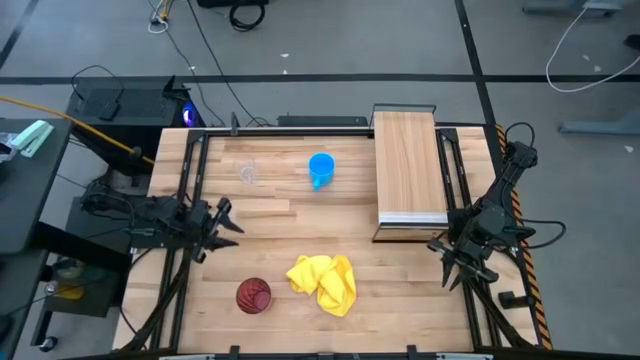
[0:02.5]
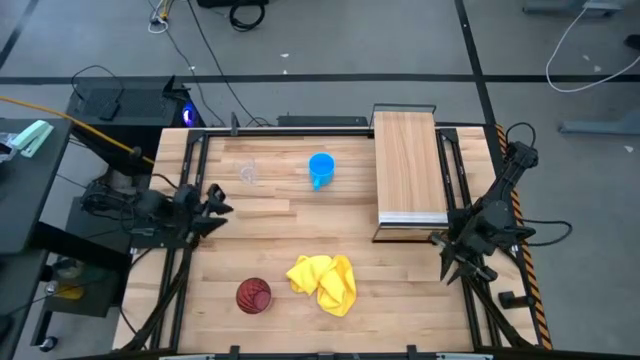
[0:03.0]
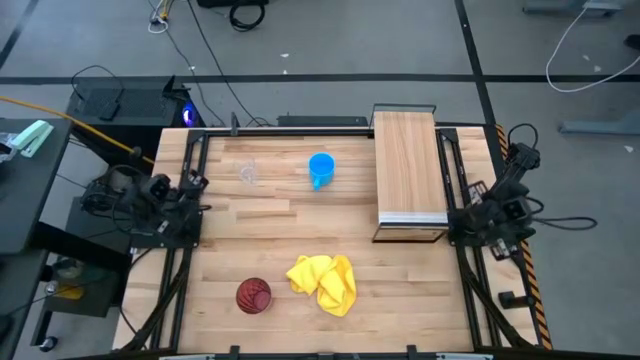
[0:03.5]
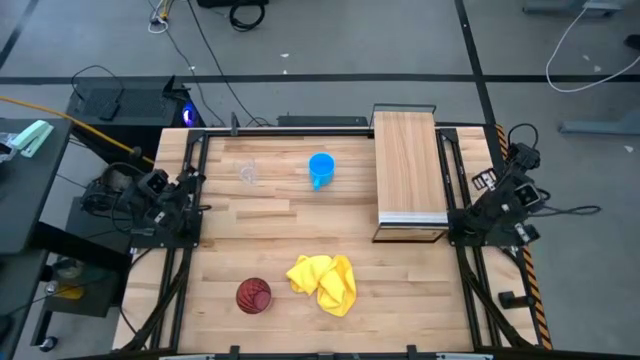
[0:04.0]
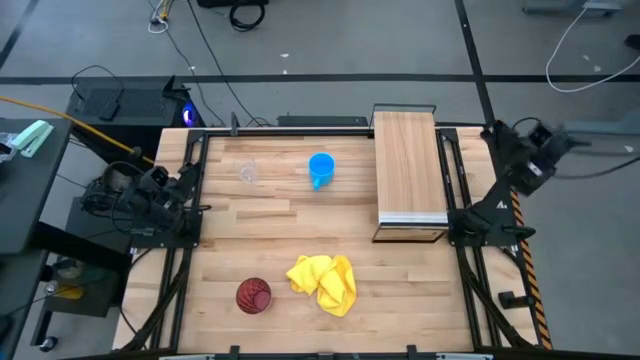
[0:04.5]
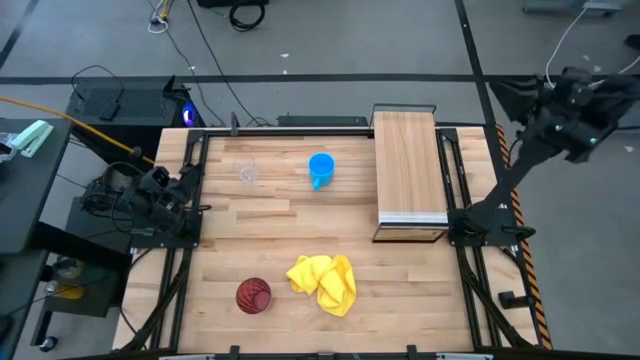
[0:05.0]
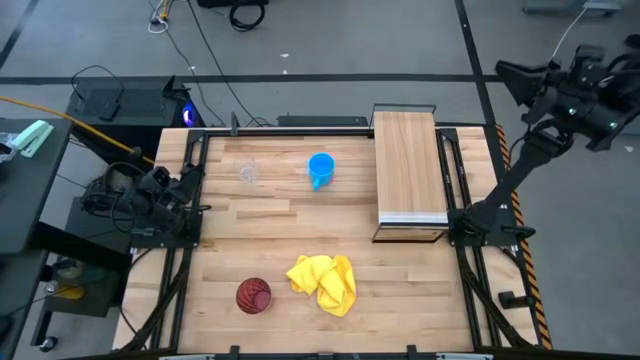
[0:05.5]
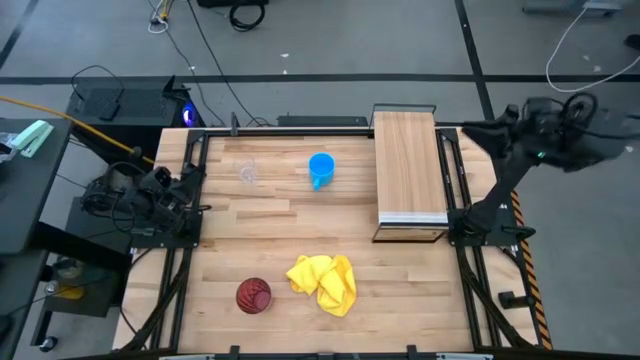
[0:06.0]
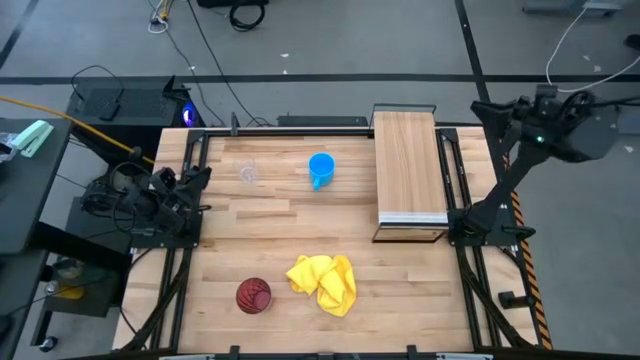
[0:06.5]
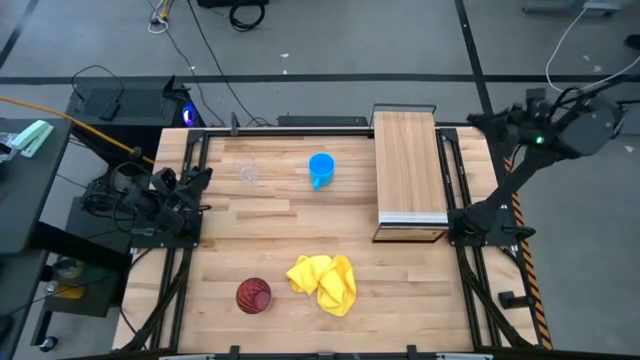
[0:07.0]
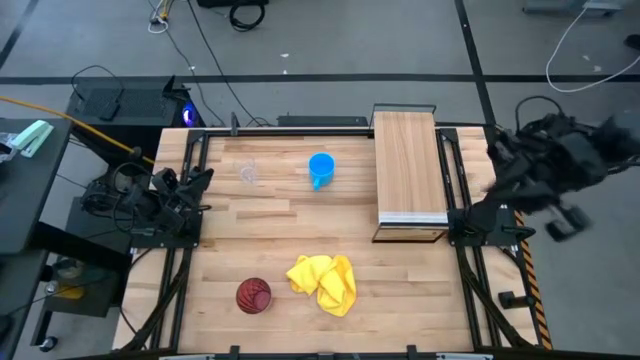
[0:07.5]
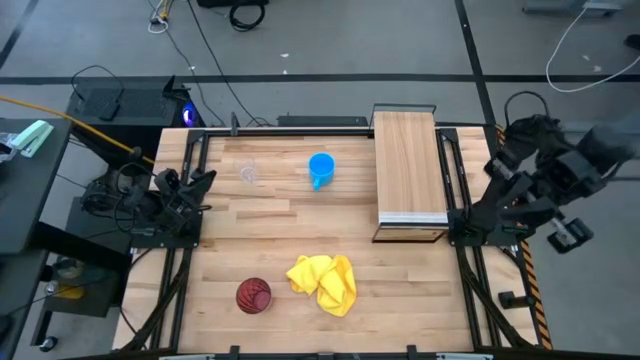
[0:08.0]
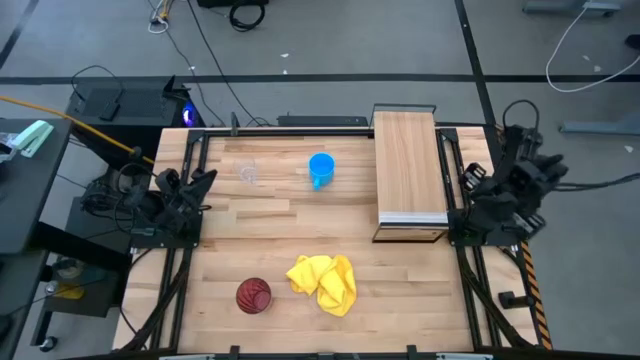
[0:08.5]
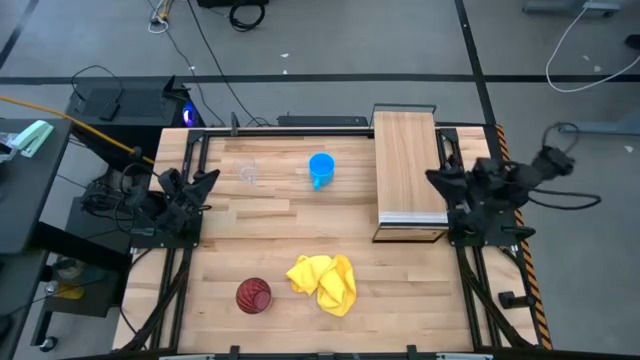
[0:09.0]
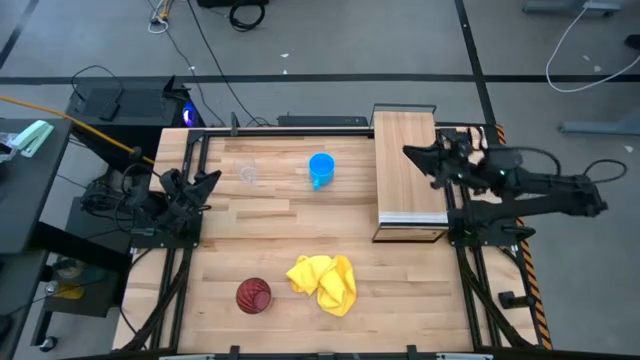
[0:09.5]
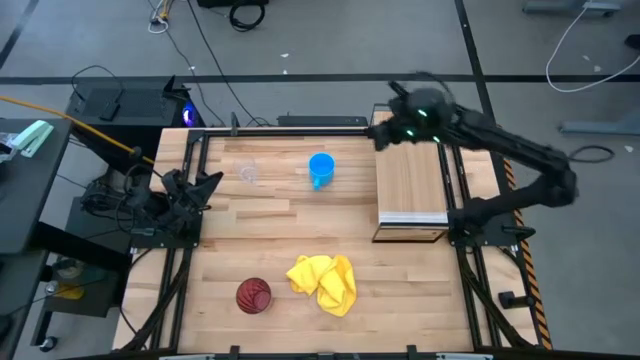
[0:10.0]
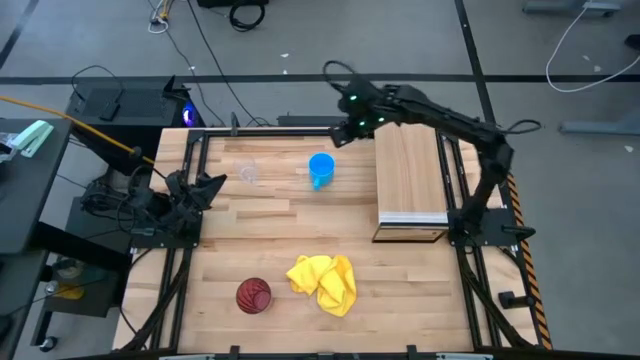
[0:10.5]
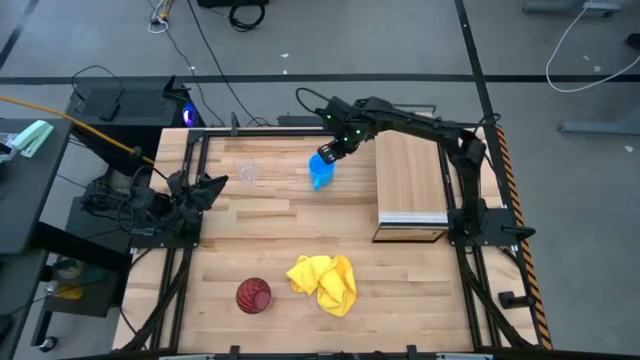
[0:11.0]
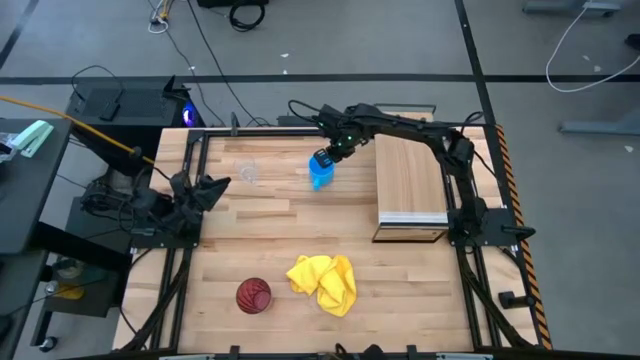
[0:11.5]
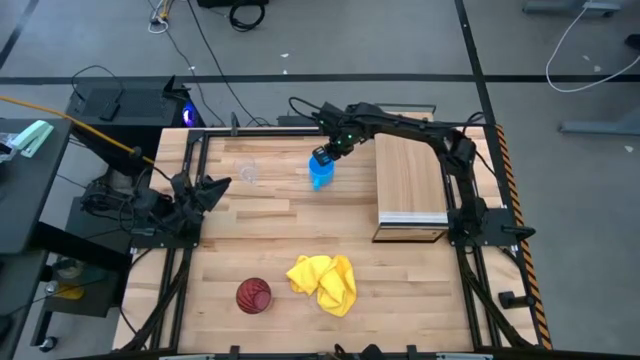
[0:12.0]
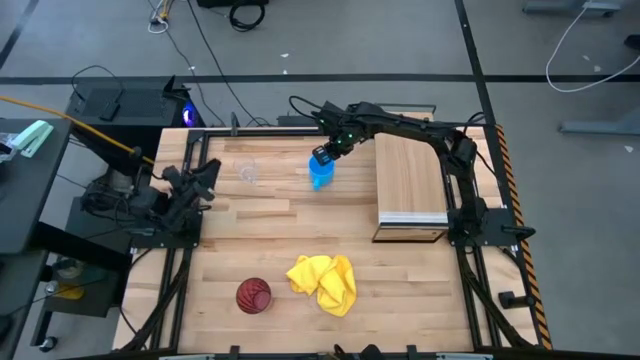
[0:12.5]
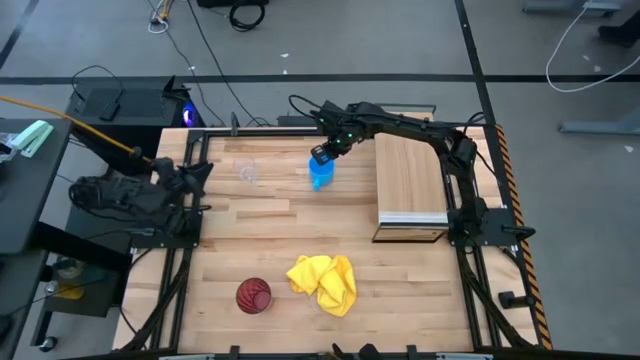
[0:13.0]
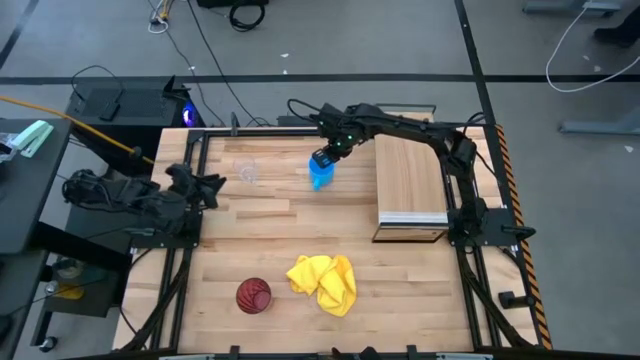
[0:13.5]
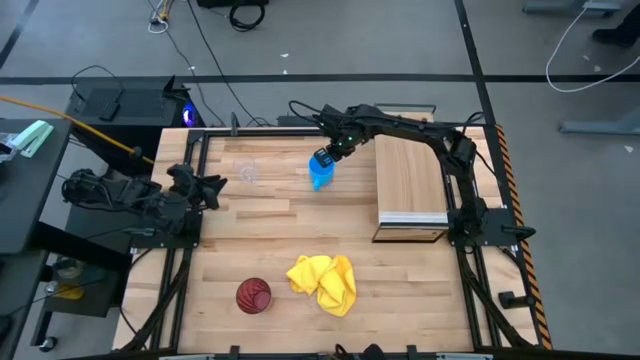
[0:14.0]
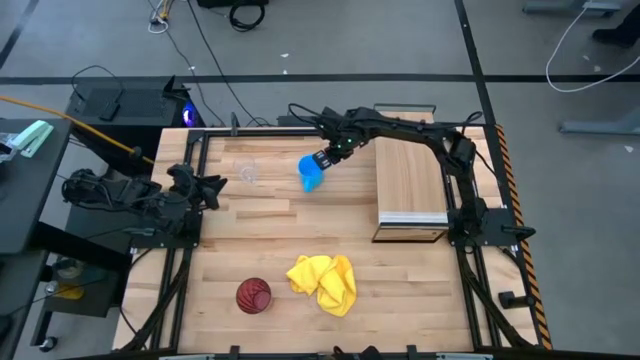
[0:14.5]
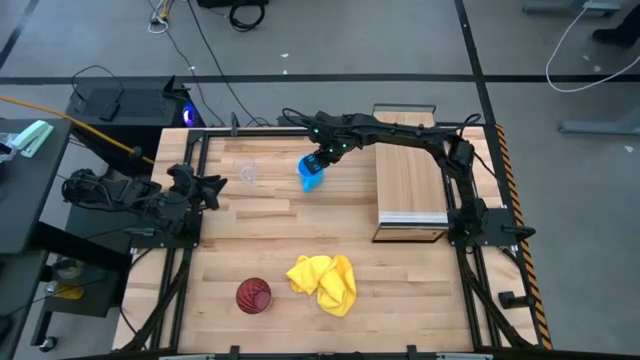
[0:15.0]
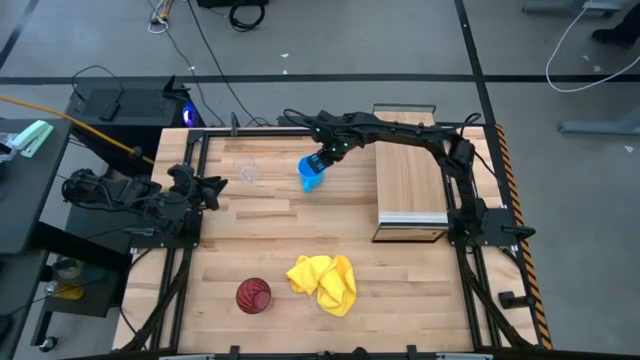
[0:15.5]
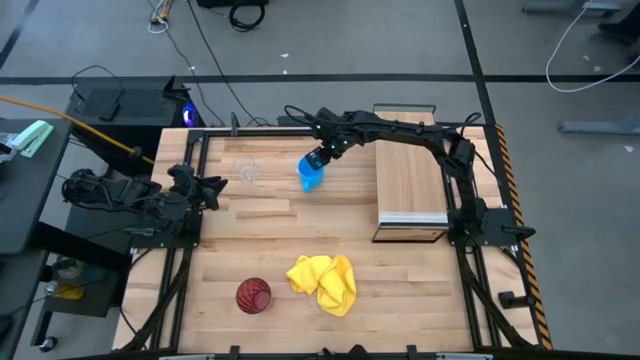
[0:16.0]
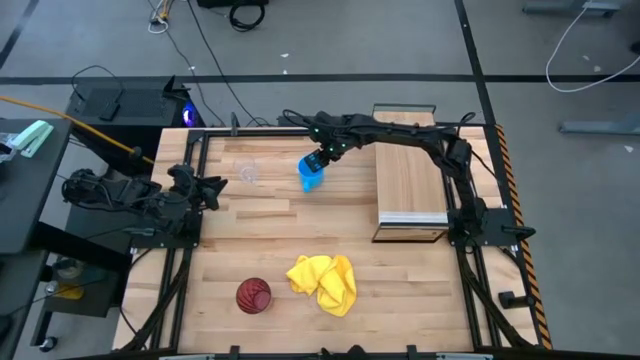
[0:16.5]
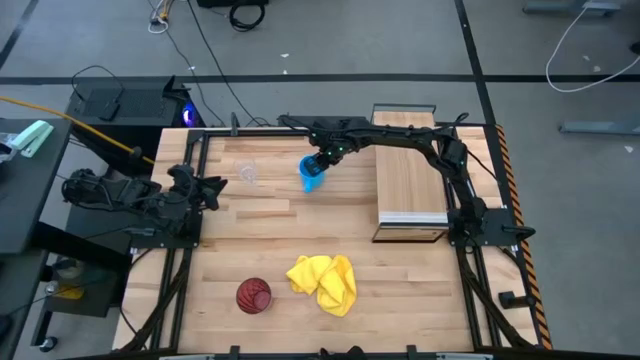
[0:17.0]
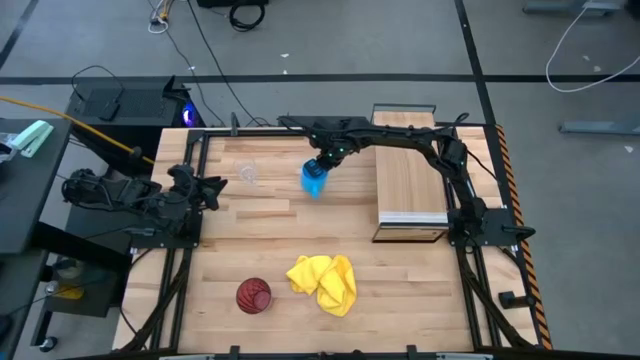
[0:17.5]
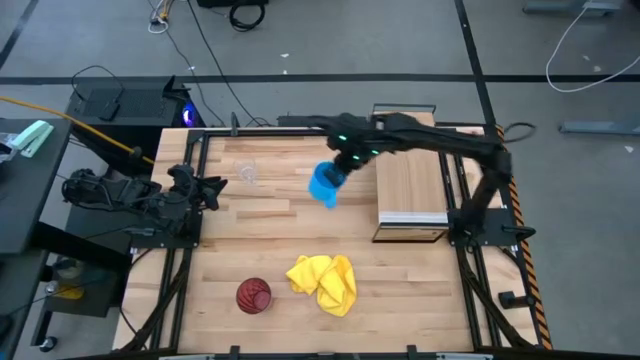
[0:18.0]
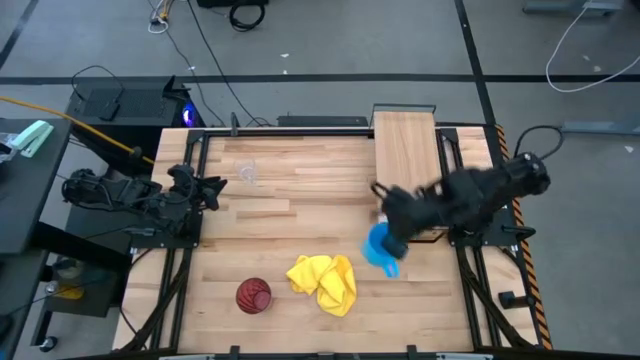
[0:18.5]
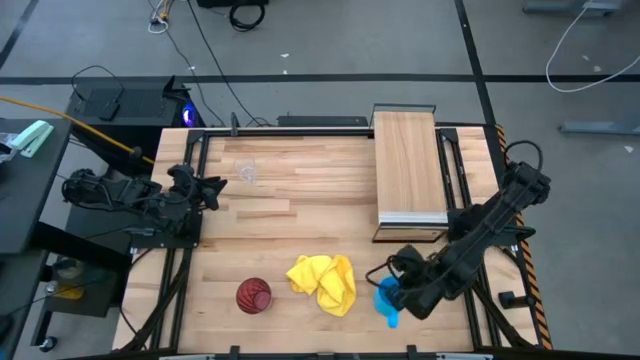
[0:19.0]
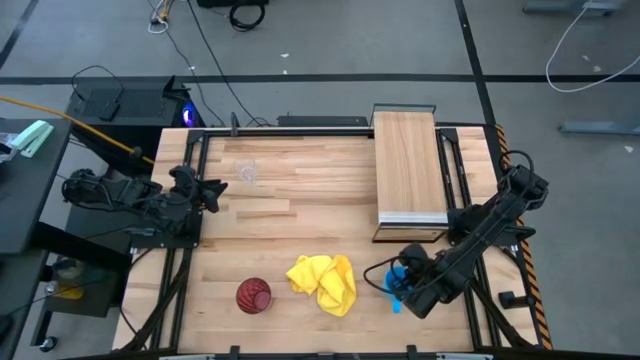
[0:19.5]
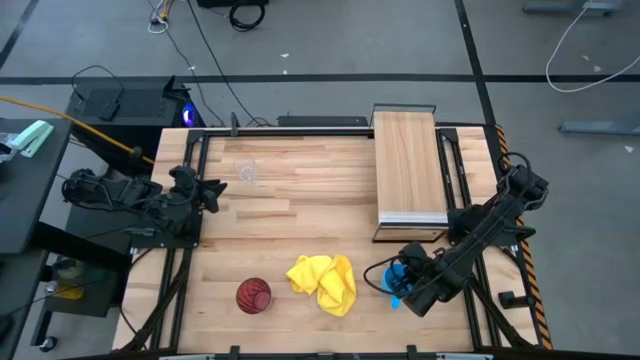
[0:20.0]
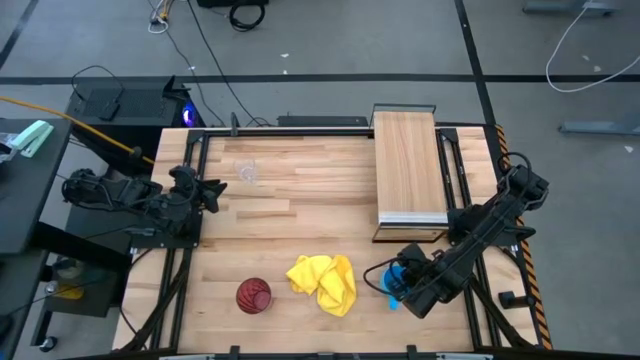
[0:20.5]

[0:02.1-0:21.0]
Task: Stack small to large cups/mugs on shelf
Move the blue mug to the bottom right of the table

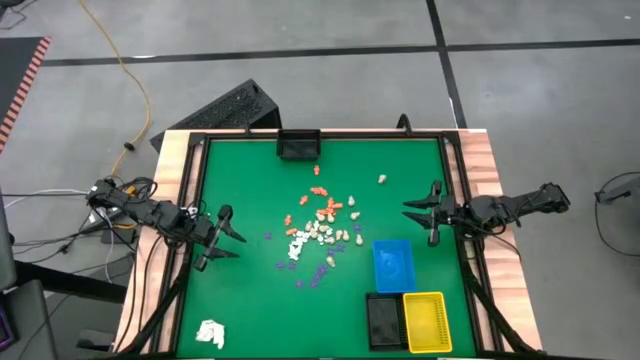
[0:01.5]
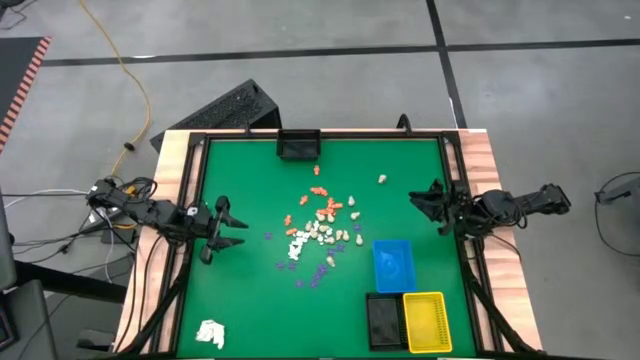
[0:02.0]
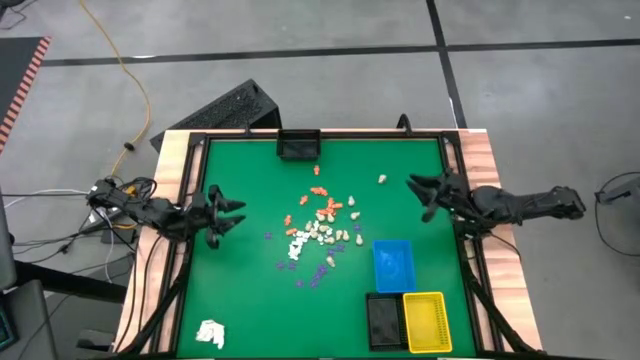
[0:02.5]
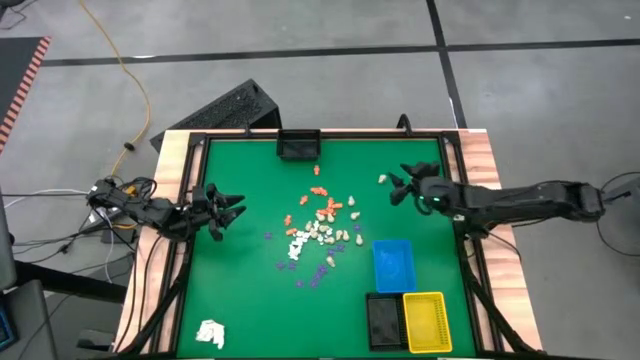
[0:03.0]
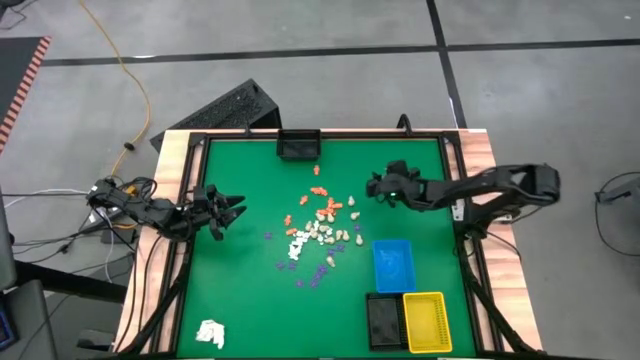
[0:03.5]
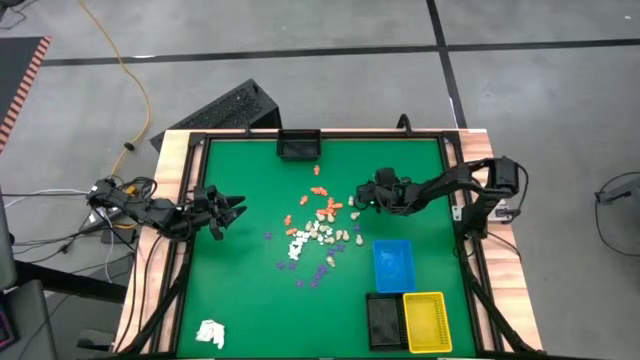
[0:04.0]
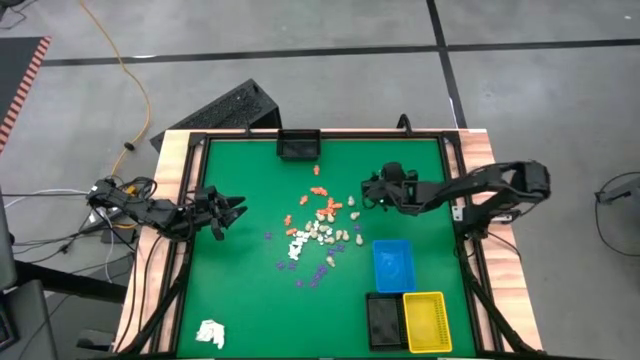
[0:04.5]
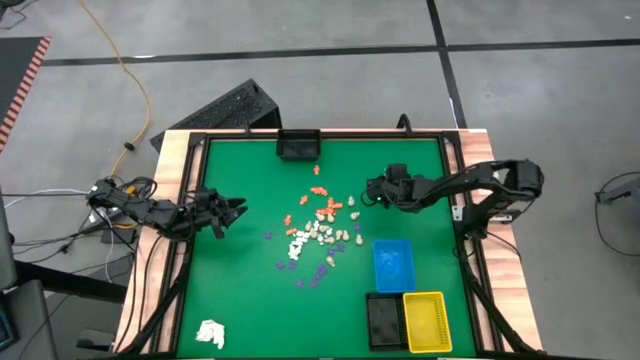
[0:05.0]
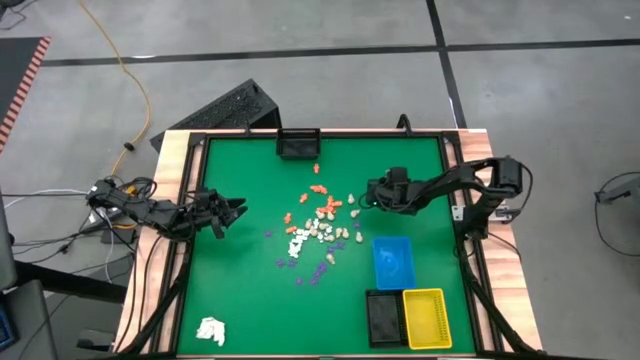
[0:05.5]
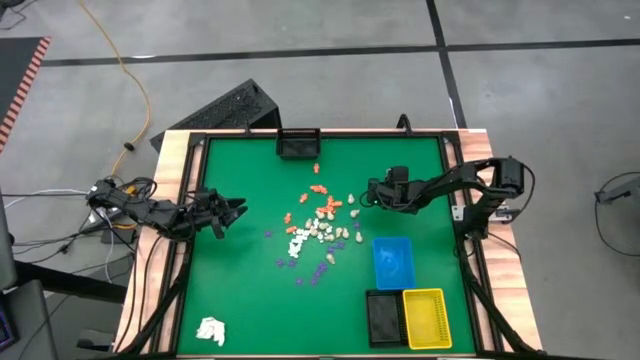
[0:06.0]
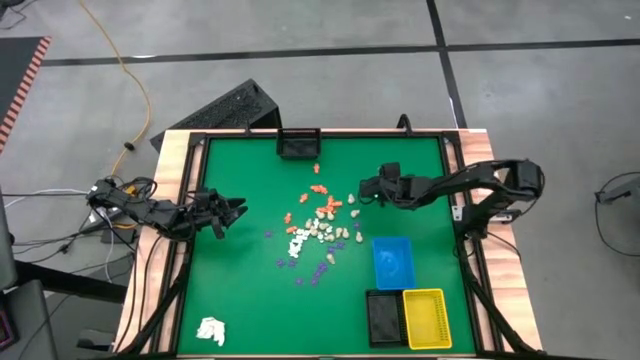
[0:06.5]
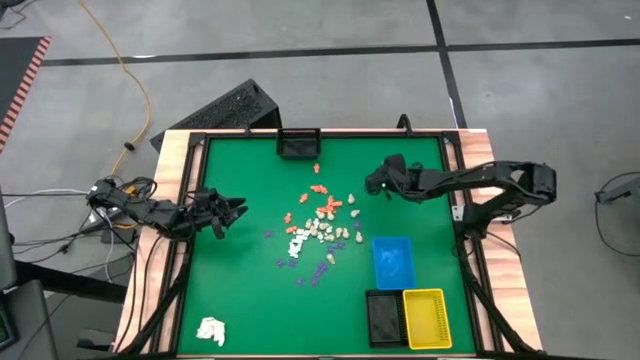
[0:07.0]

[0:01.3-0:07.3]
Task: Sort Halloween decoration
Put the gray skull toy into the top black bin
